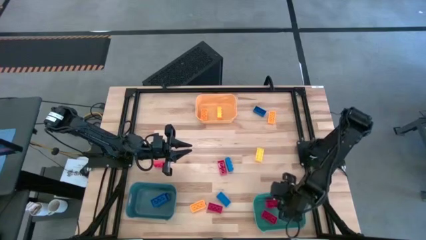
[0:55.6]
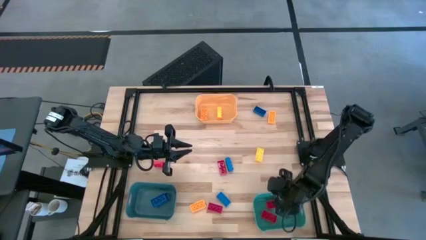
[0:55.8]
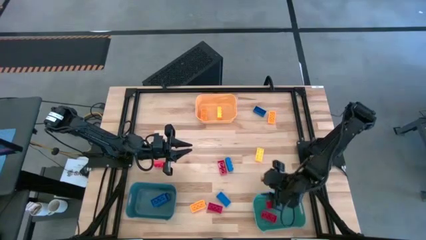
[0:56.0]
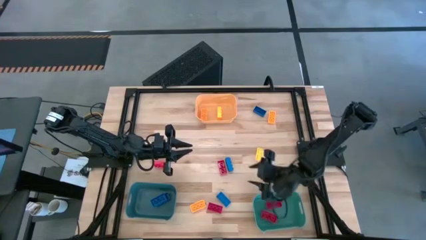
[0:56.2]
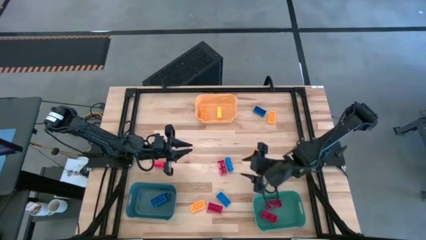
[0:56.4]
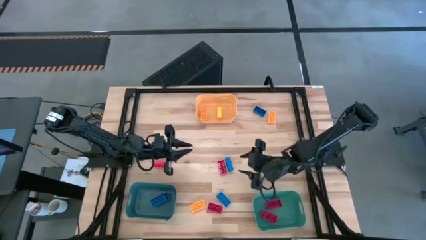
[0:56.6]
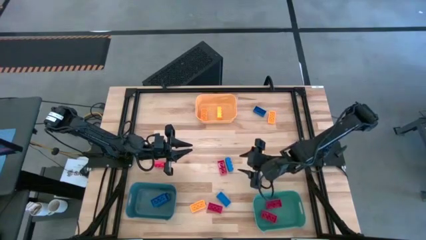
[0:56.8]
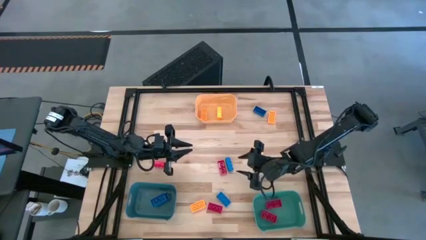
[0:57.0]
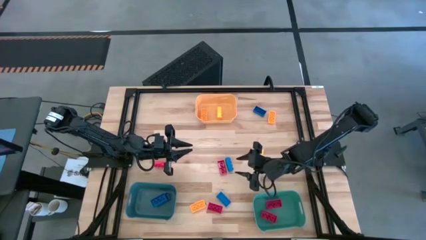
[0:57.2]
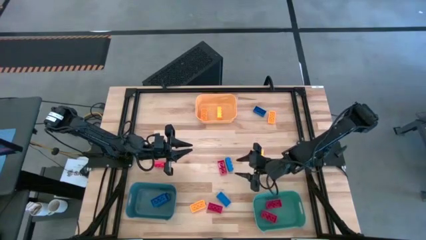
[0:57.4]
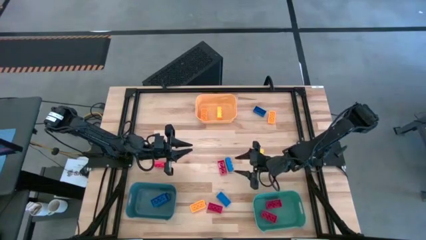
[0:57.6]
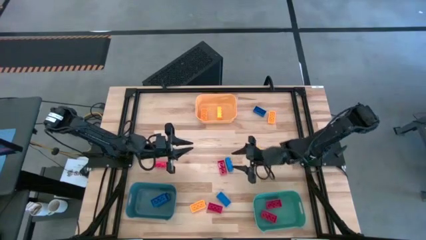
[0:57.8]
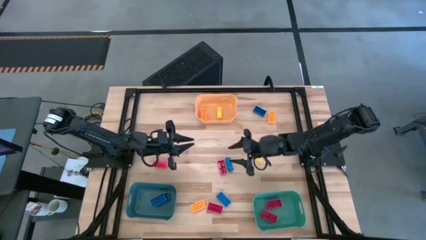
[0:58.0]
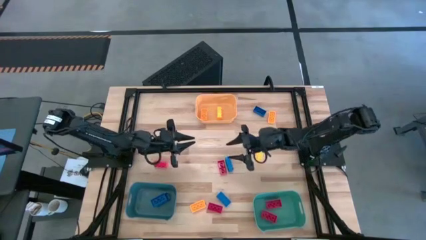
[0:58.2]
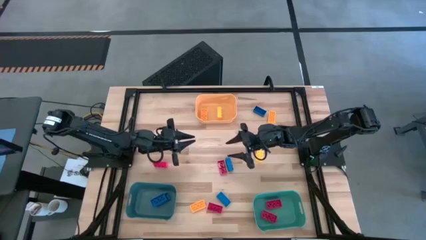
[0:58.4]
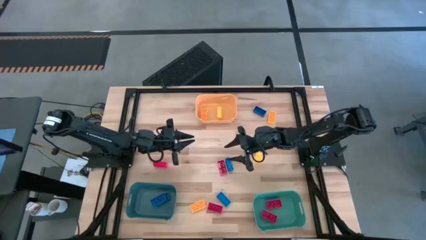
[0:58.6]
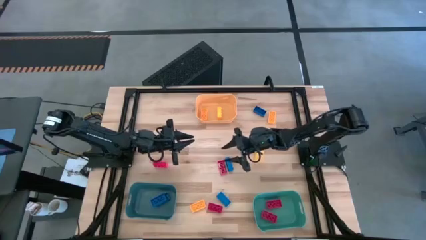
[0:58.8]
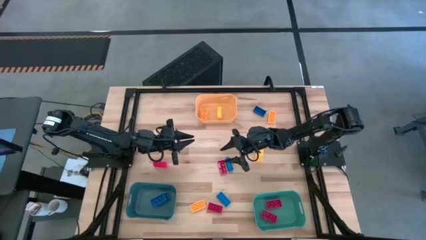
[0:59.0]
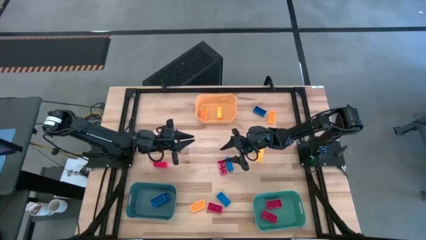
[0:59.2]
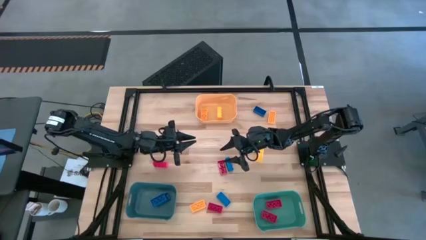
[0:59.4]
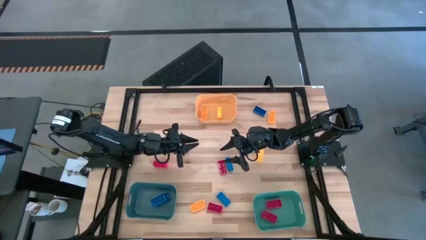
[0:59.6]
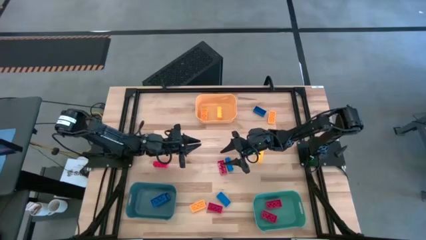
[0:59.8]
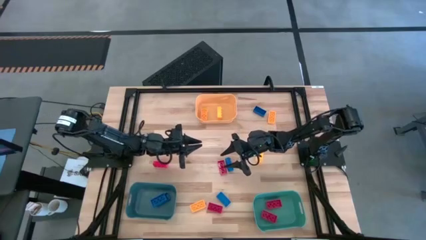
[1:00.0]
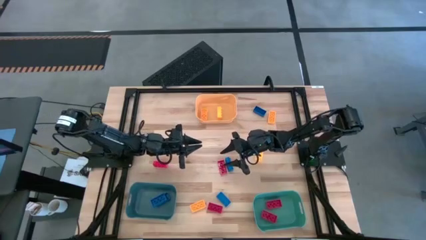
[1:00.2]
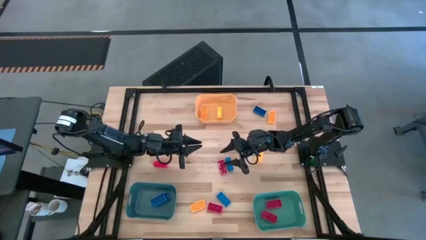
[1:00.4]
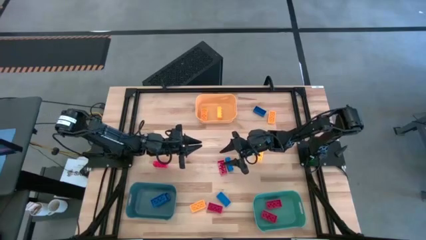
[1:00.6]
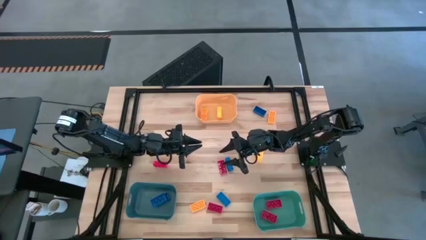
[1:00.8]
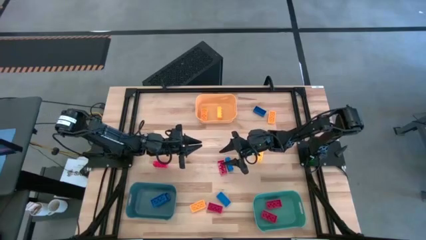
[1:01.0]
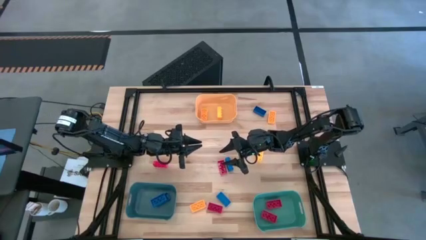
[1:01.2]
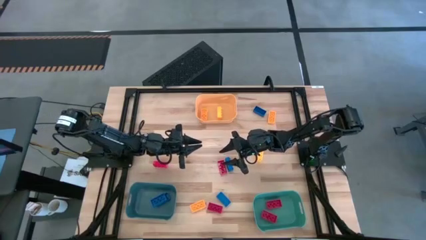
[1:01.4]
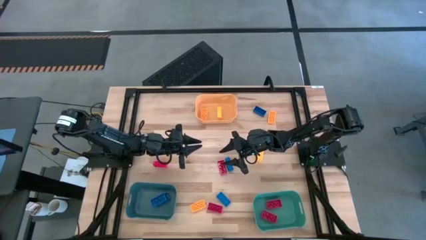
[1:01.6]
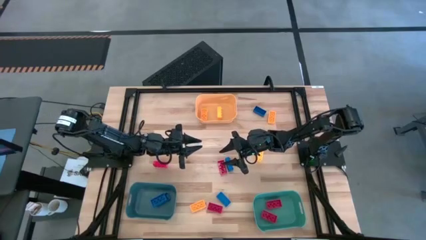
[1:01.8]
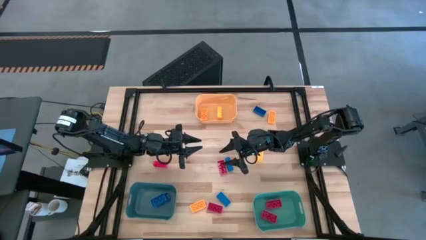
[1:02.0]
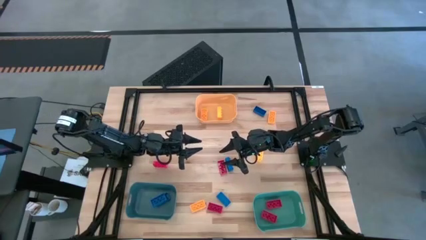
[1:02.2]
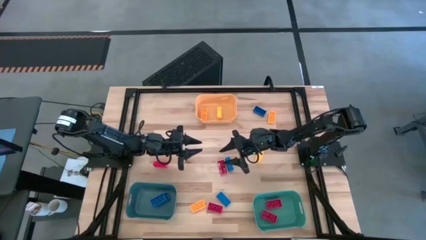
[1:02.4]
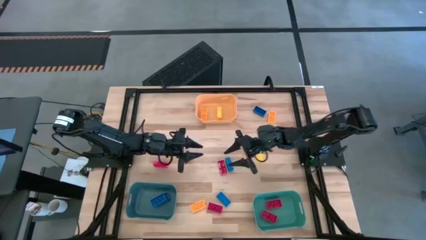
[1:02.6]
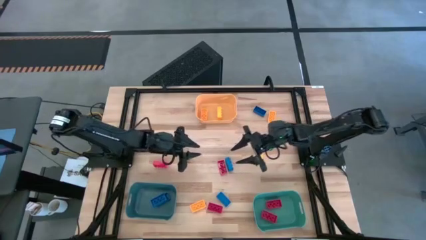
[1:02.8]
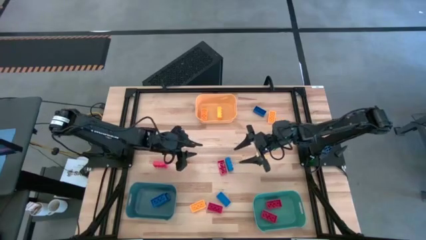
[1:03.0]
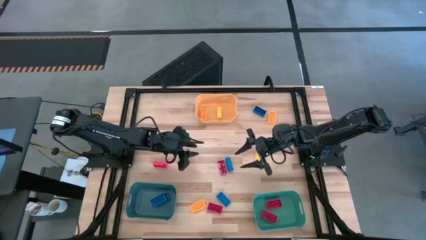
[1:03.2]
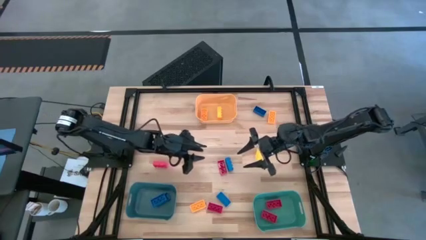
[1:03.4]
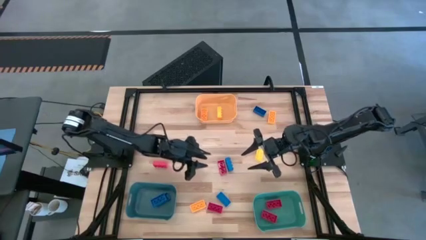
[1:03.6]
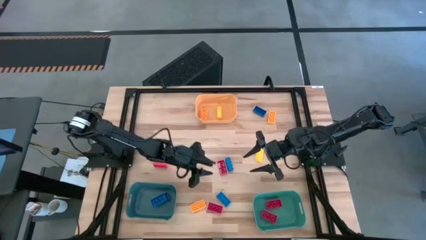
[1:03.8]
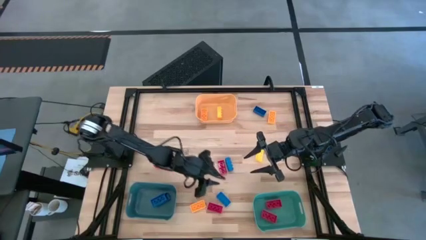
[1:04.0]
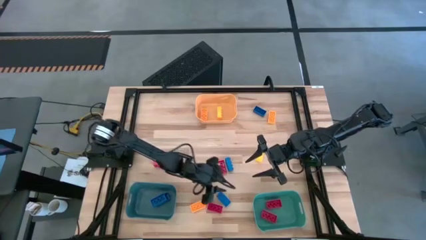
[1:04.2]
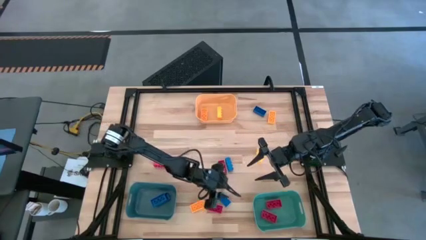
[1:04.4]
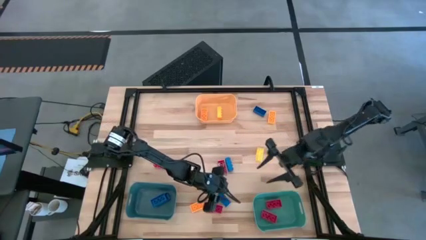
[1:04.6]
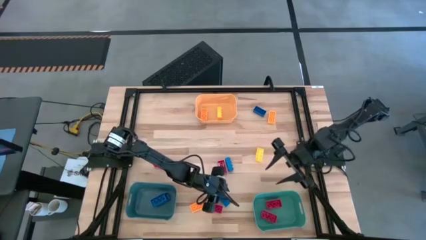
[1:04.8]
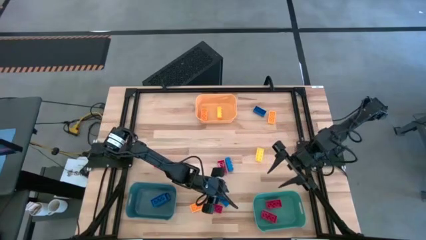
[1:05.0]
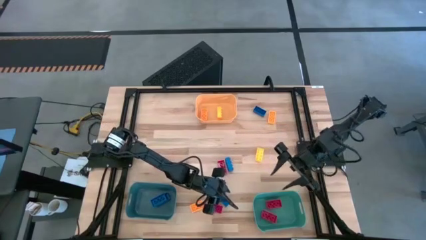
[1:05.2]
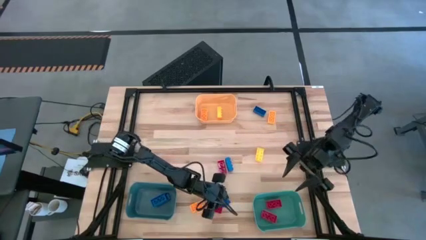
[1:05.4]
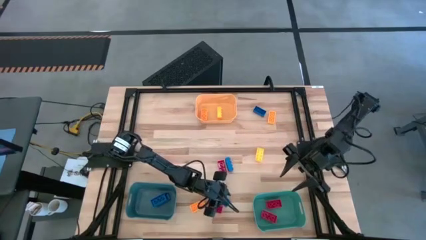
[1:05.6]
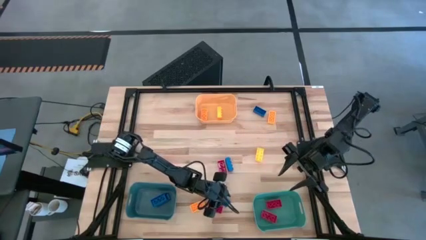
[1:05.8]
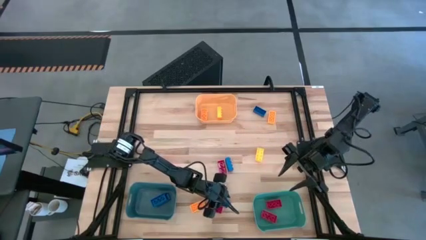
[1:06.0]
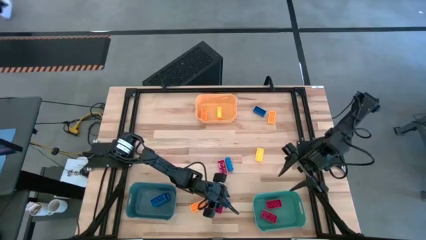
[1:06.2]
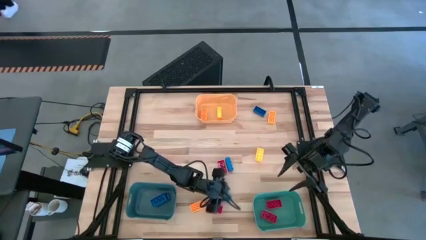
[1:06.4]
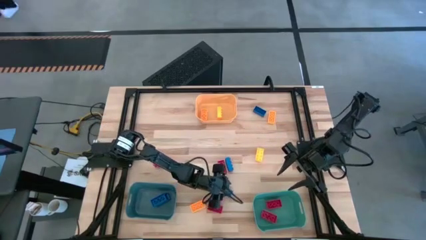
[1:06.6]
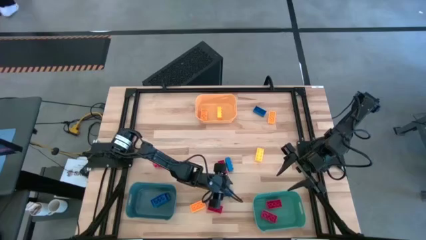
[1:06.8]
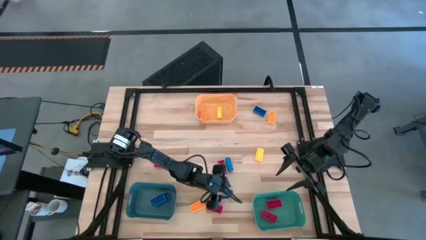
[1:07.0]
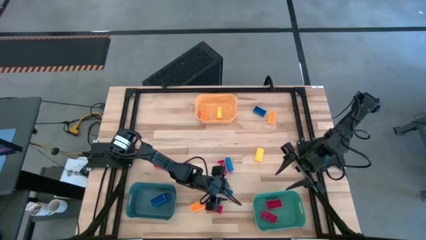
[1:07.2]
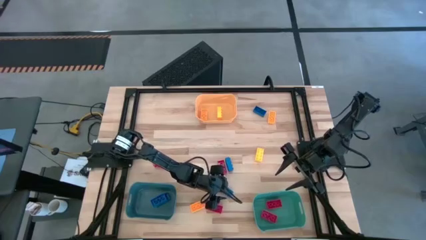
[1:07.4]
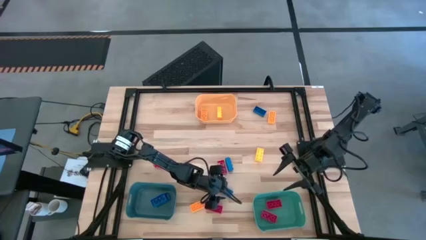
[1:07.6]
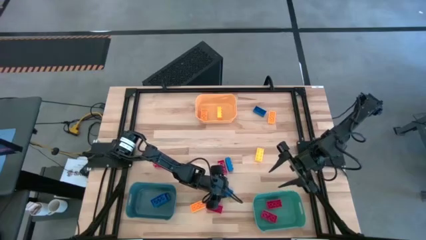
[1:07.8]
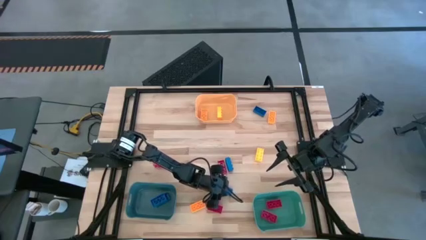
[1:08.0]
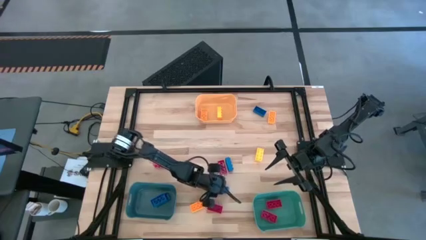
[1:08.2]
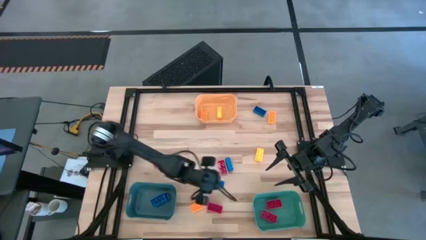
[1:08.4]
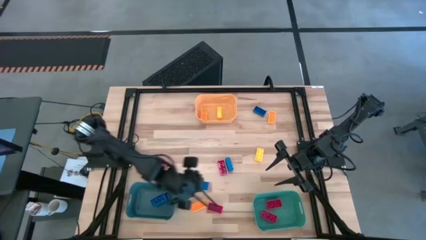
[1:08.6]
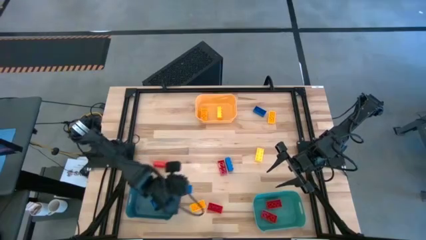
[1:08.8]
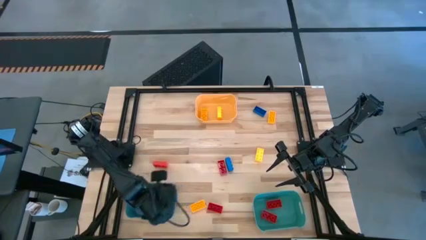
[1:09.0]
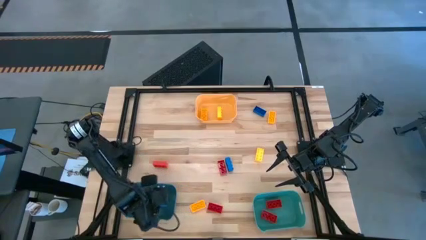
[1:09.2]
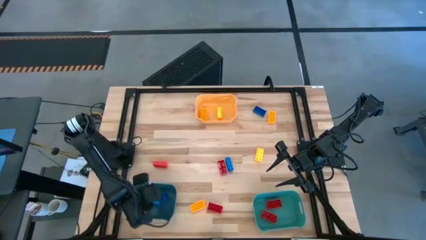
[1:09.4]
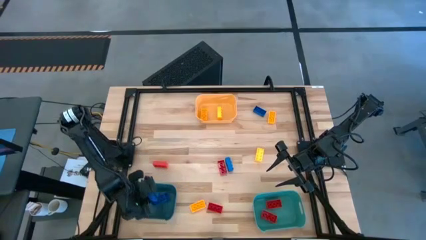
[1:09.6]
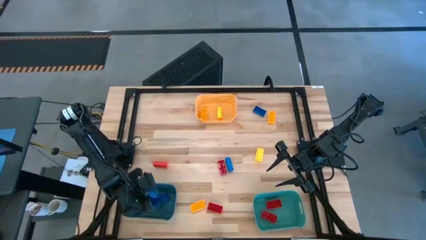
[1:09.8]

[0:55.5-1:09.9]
Task: Sort & place blocks by color
Put the blue game piece into the blue bin
